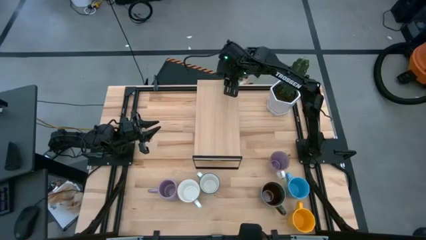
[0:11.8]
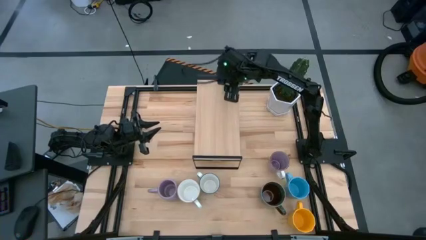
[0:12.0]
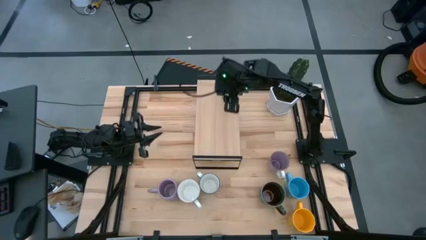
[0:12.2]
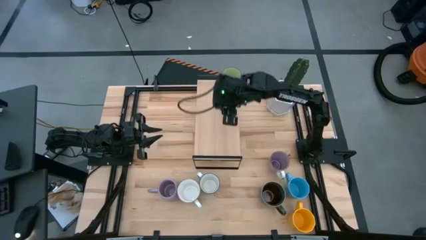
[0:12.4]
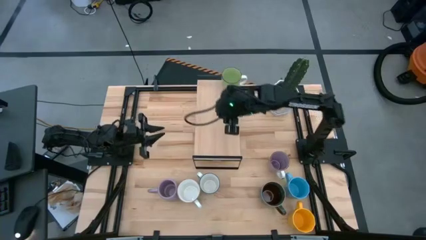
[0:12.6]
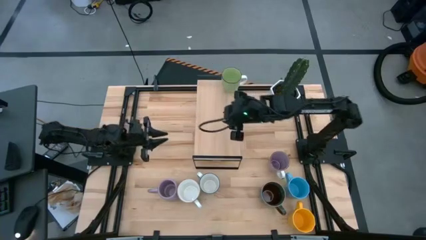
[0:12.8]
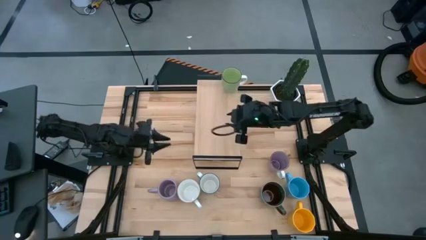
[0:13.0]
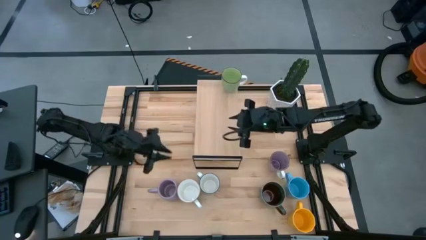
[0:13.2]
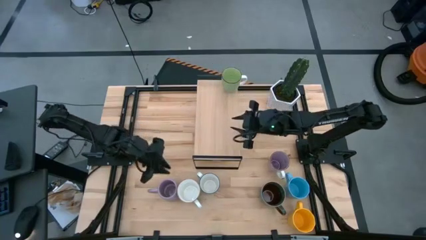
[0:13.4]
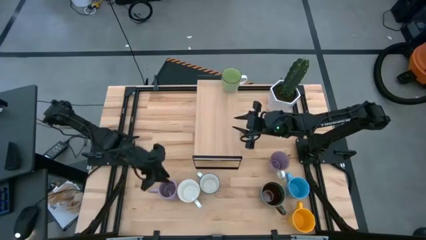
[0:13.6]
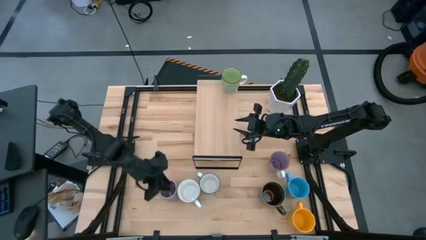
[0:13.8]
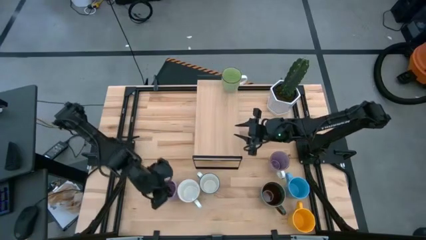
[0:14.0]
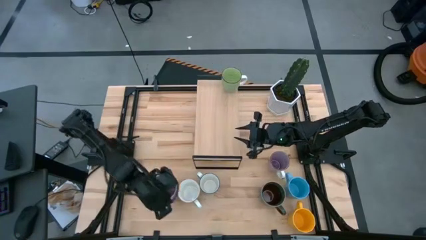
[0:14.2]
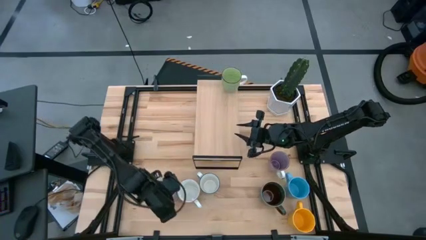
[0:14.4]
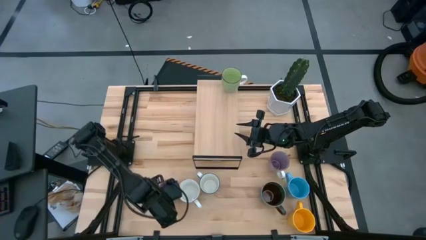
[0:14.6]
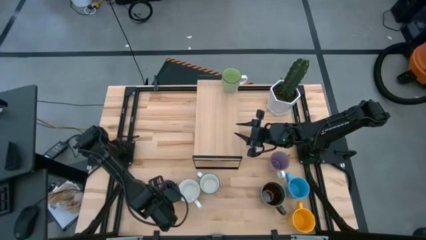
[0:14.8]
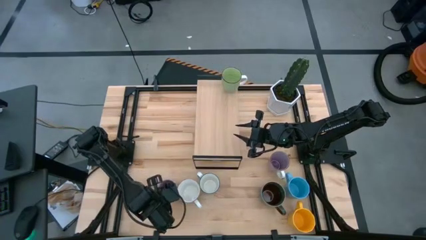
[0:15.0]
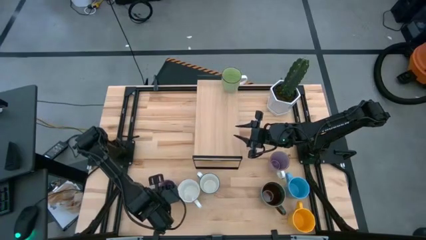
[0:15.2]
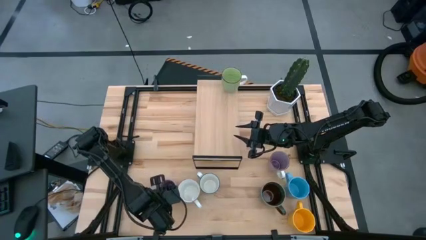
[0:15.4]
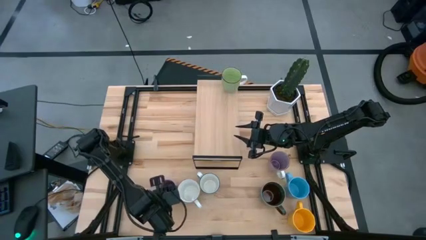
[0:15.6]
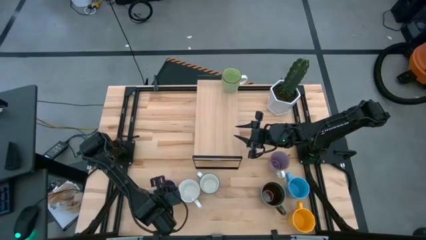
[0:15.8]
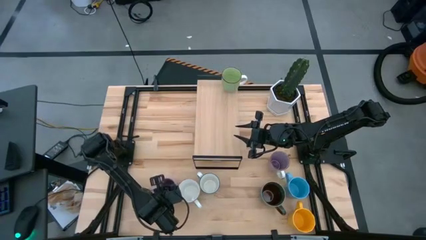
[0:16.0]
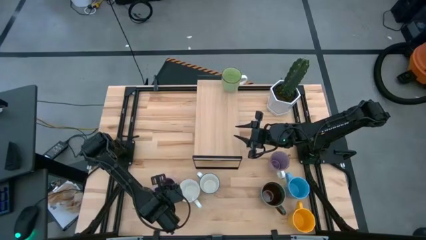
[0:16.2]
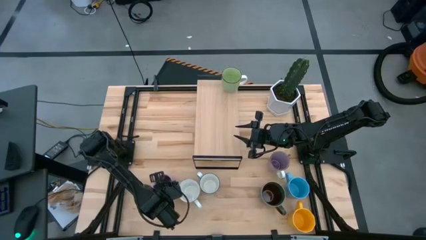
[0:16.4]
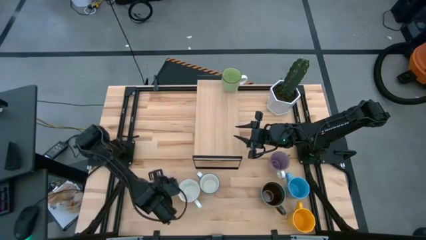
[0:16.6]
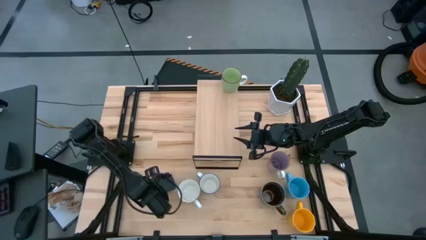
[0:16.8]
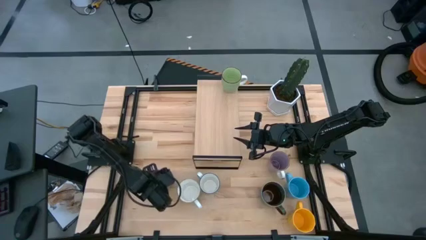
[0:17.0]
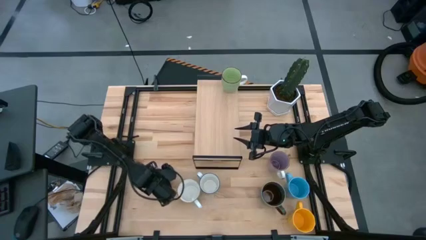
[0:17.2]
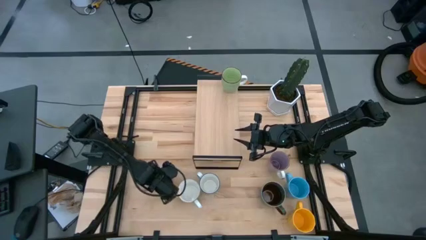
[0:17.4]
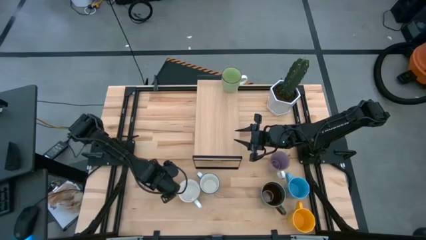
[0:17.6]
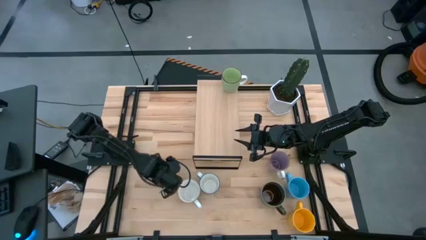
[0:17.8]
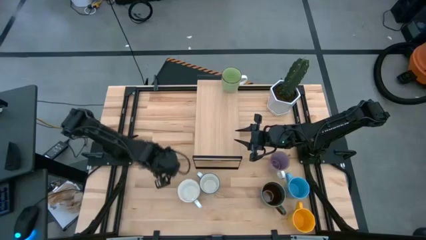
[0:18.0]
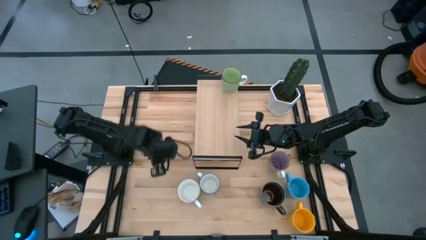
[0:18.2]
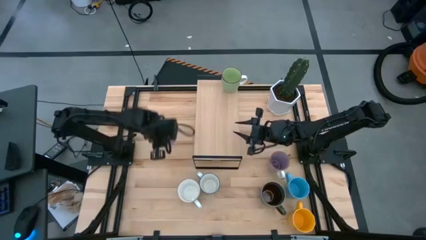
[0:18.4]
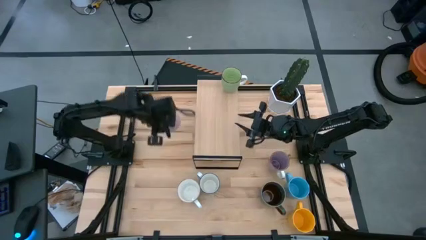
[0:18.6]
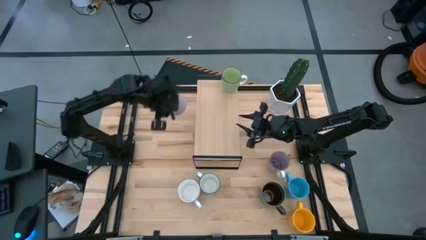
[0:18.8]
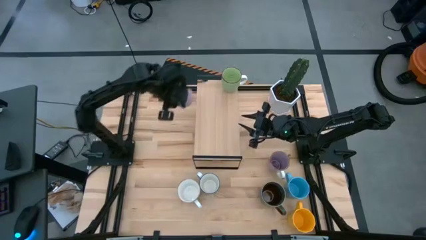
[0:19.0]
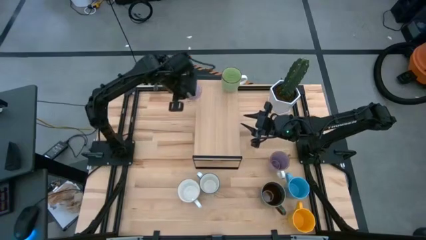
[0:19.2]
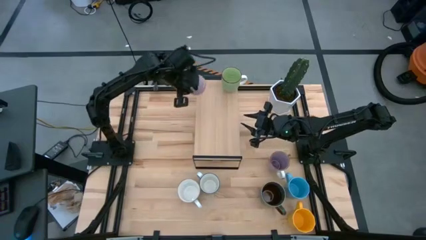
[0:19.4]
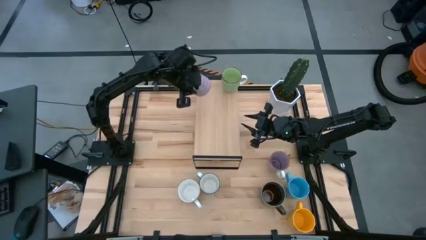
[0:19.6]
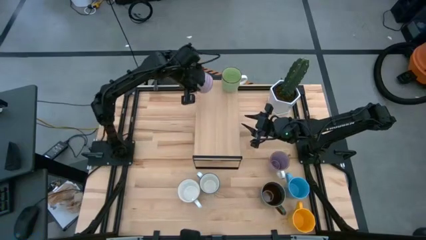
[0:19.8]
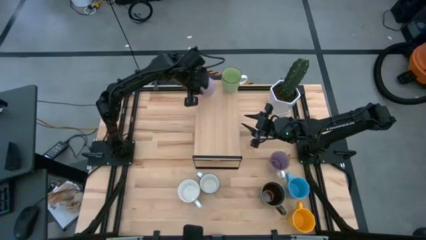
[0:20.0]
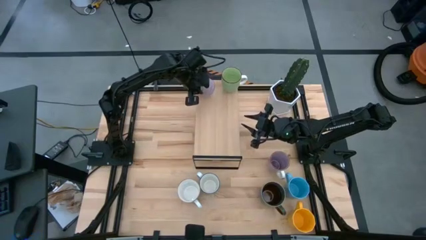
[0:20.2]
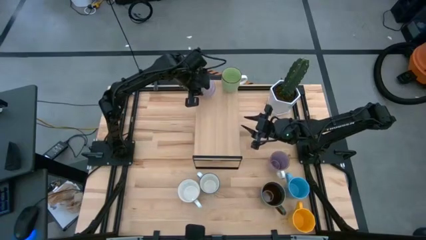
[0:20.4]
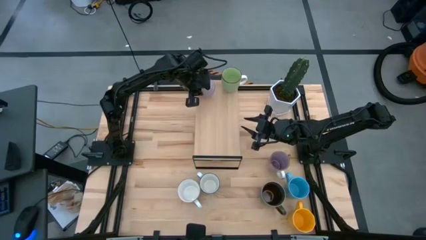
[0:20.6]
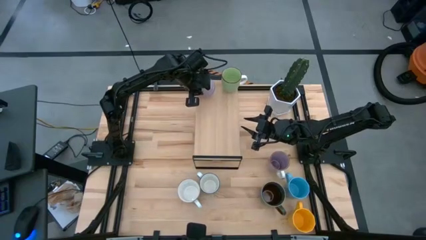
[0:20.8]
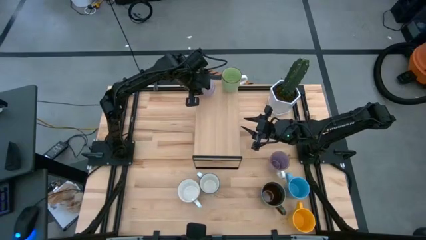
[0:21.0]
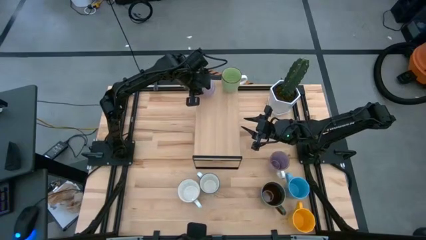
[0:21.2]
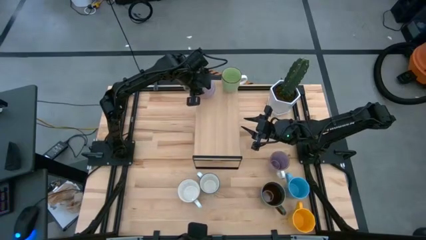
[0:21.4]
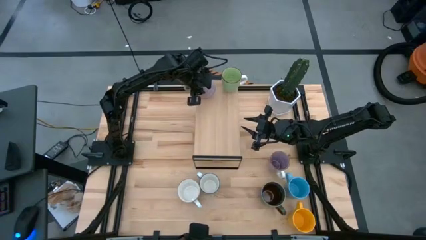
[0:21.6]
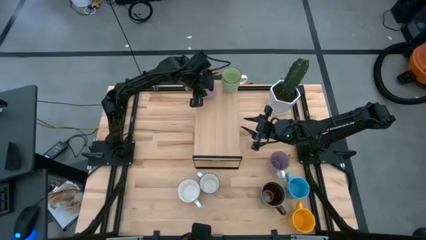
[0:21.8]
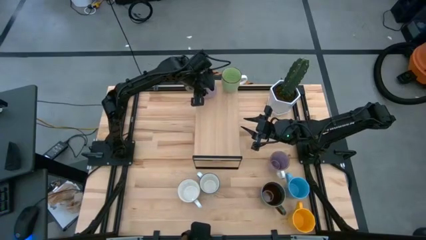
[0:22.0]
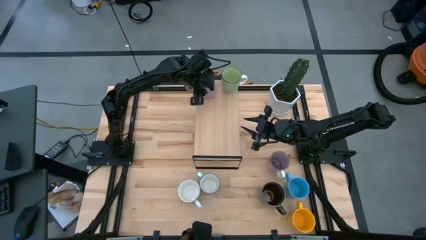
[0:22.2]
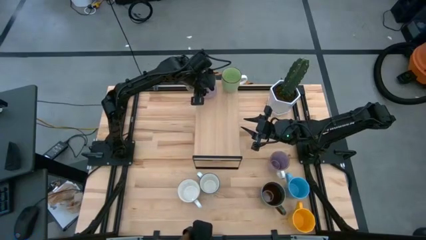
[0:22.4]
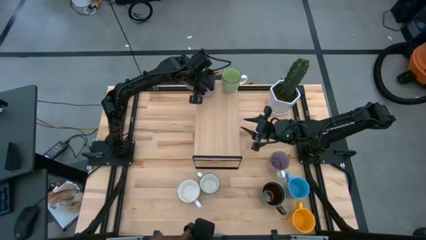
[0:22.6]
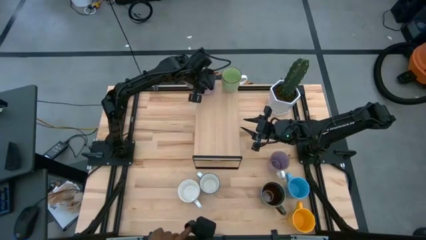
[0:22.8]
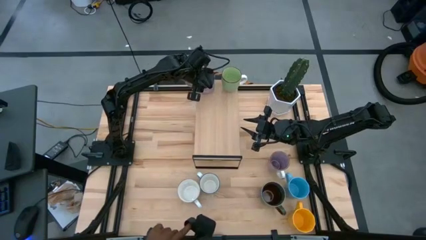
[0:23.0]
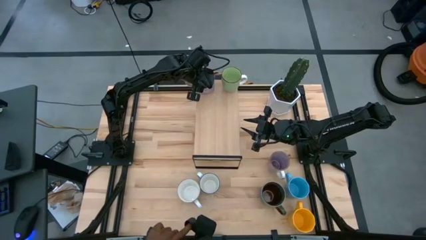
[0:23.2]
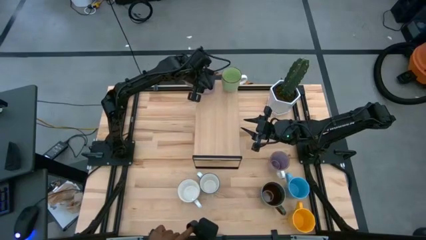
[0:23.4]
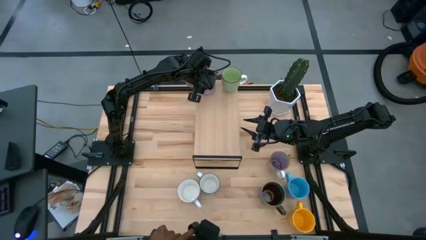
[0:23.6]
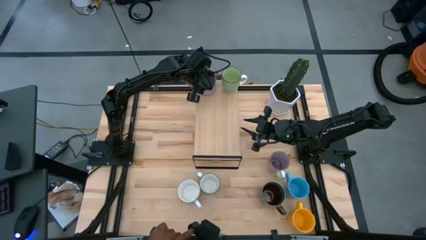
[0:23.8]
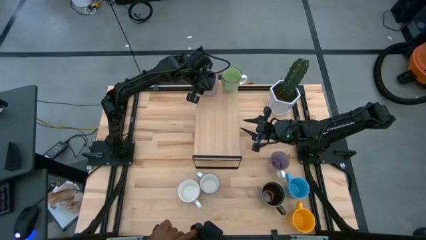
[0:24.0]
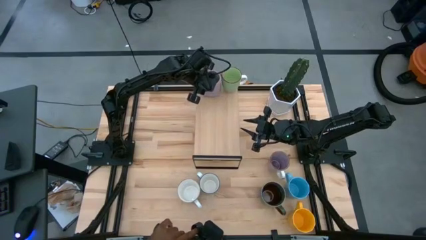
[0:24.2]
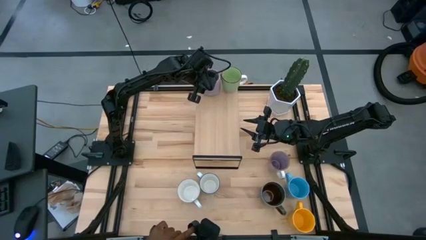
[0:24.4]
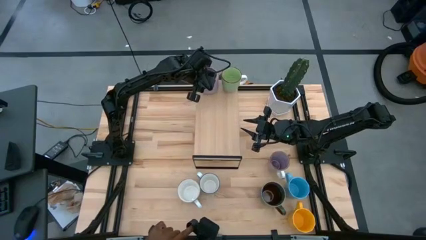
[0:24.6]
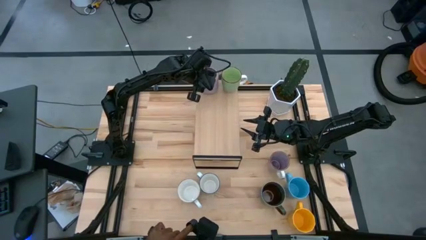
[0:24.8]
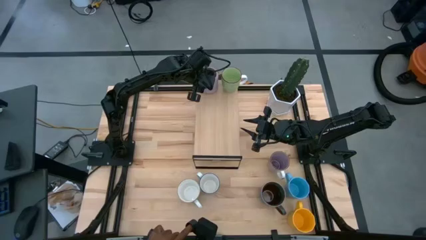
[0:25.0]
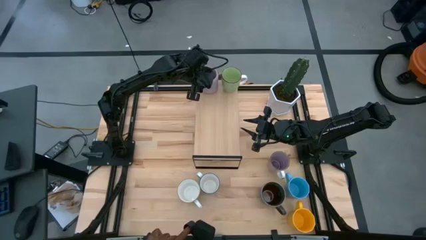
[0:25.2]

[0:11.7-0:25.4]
Task: Place coffee mugs
Put the left violet mug on the shelf

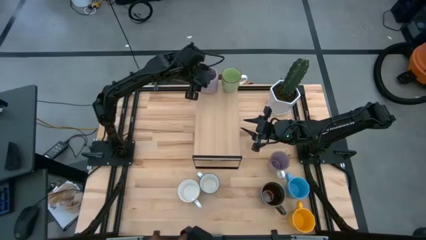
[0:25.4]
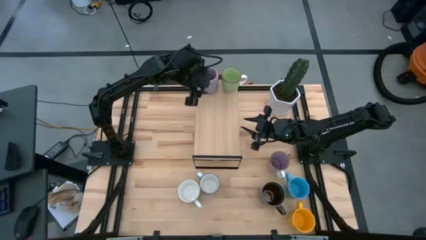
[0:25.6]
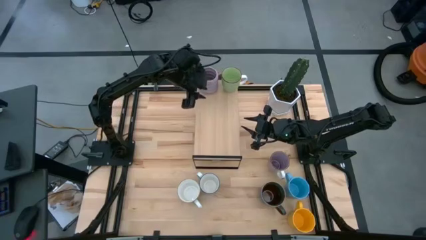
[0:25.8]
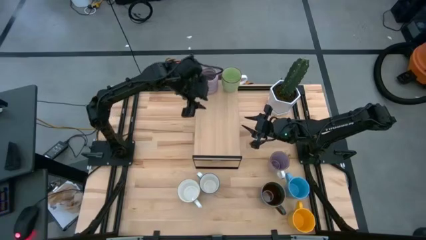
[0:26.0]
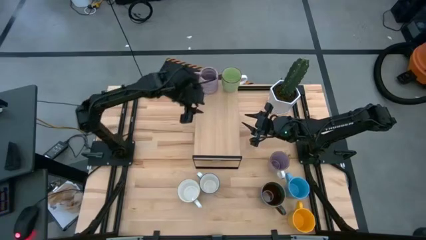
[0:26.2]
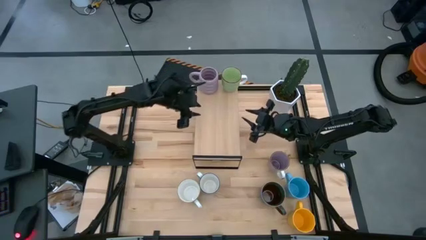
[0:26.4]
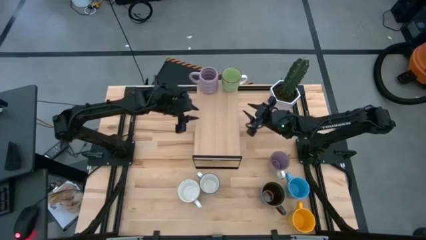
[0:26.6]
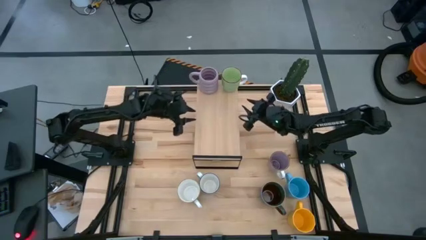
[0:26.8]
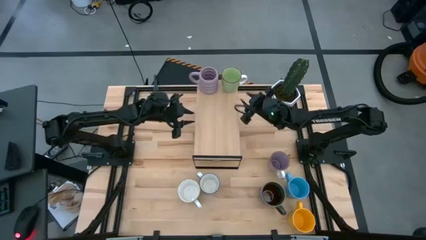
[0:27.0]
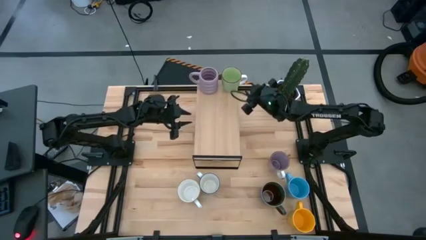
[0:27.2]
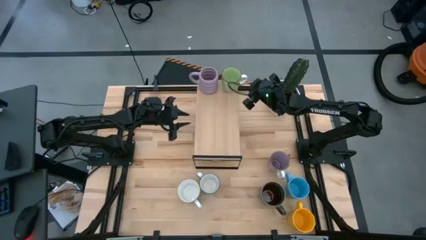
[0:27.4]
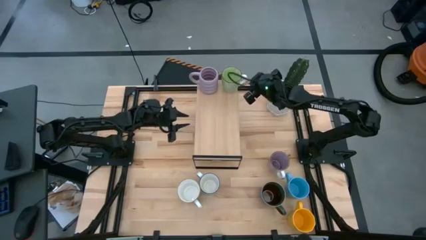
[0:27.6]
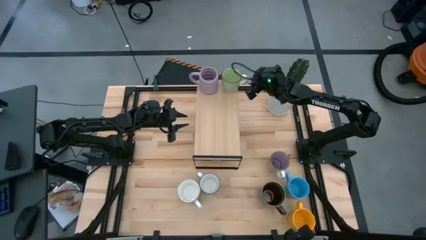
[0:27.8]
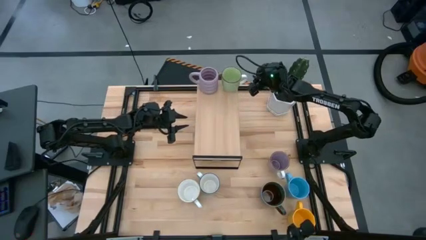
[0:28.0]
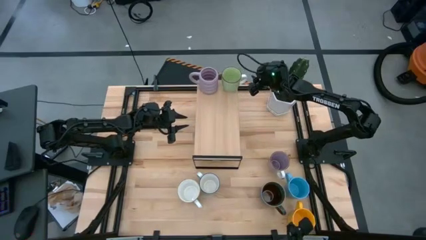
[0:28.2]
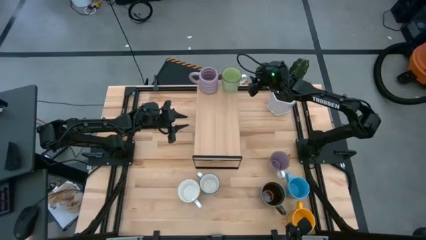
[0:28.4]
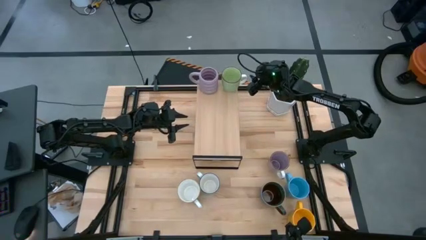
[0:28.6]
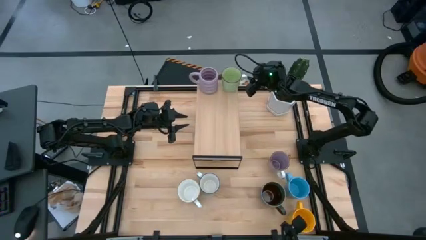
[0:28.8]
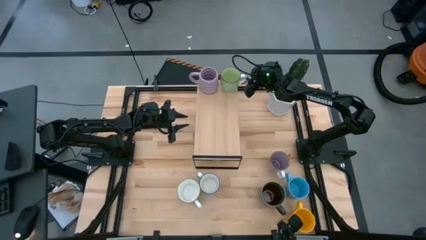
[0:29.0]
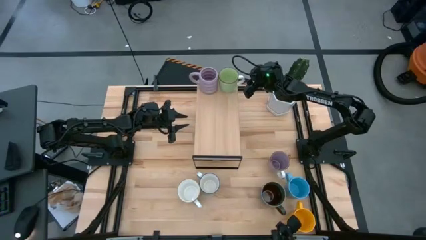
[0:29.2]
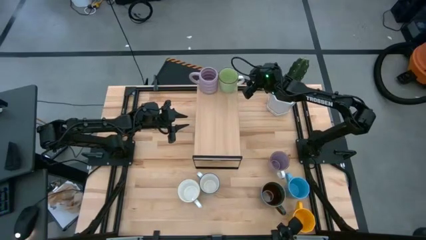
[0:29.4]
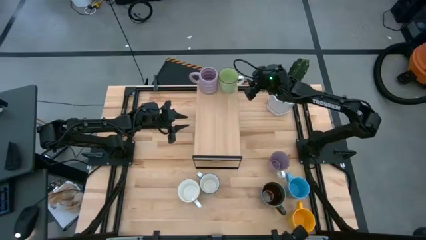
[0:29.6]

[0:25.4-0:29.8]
Adjust the green mug on the shelf
